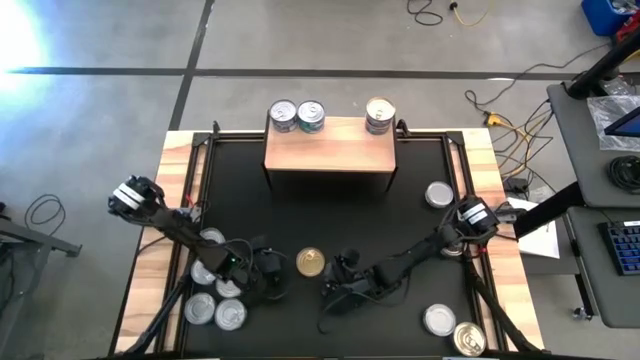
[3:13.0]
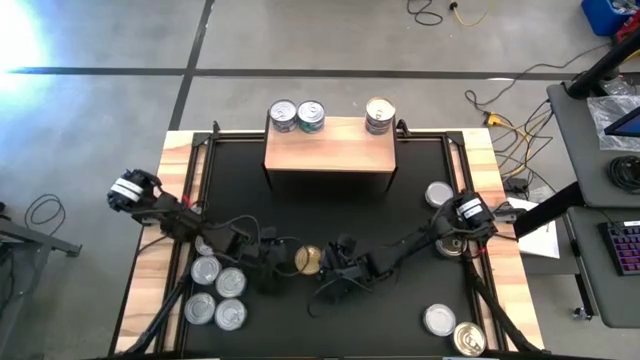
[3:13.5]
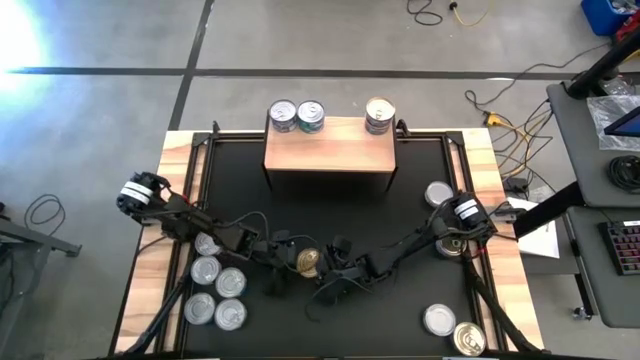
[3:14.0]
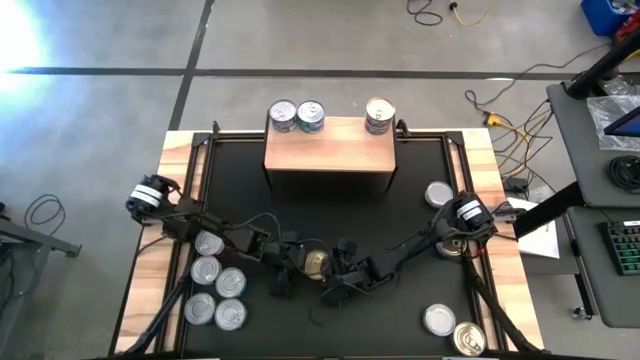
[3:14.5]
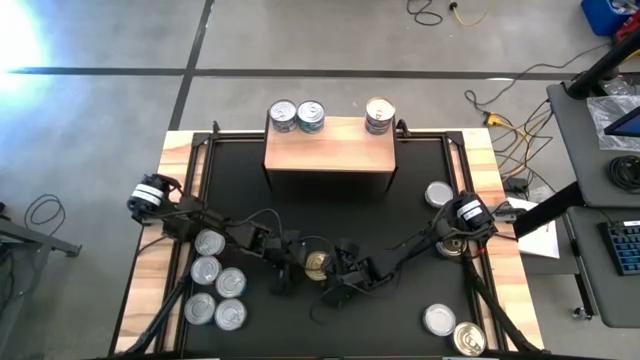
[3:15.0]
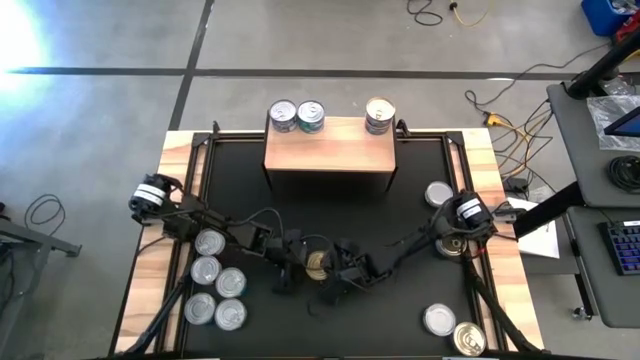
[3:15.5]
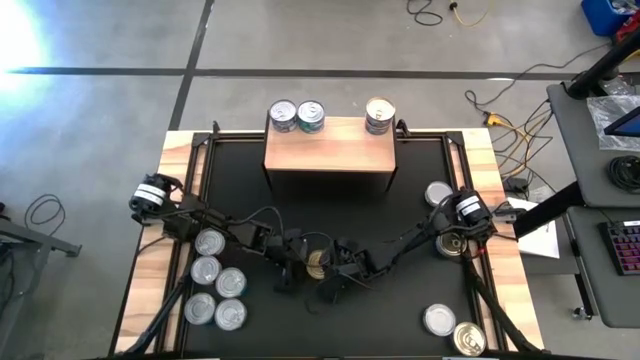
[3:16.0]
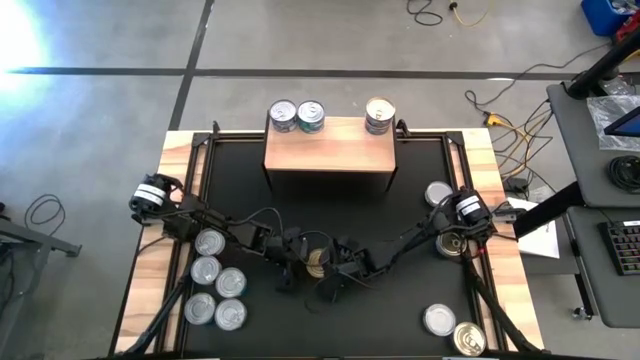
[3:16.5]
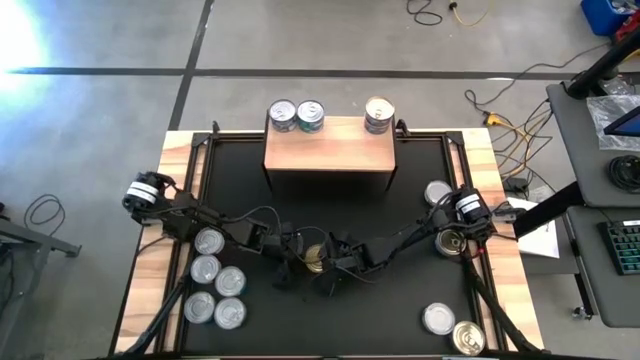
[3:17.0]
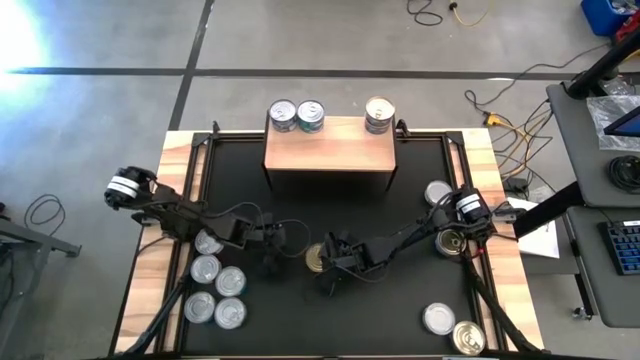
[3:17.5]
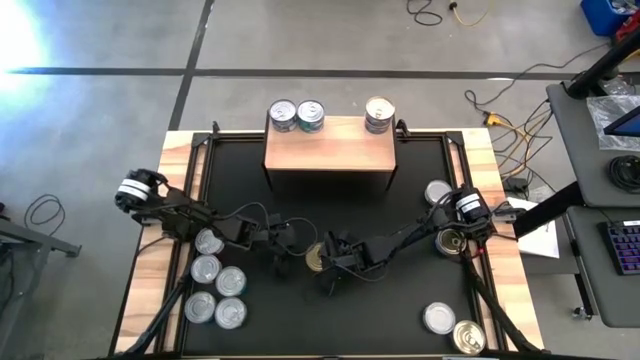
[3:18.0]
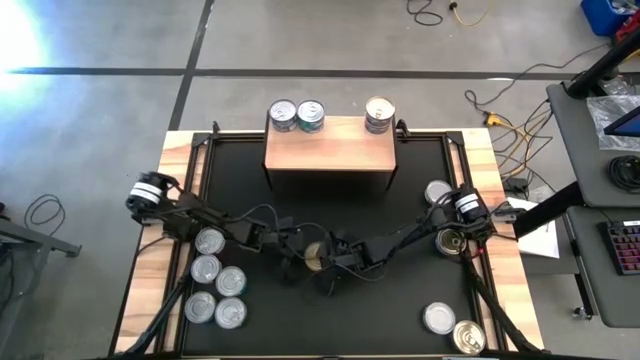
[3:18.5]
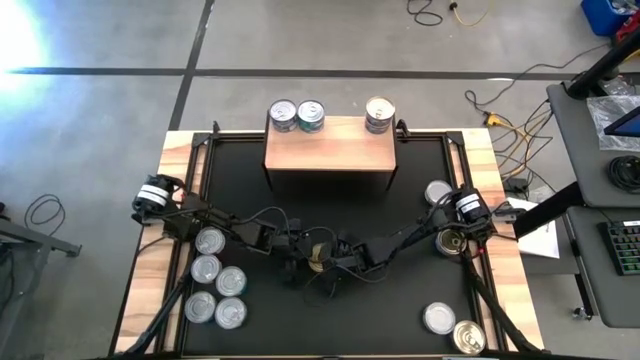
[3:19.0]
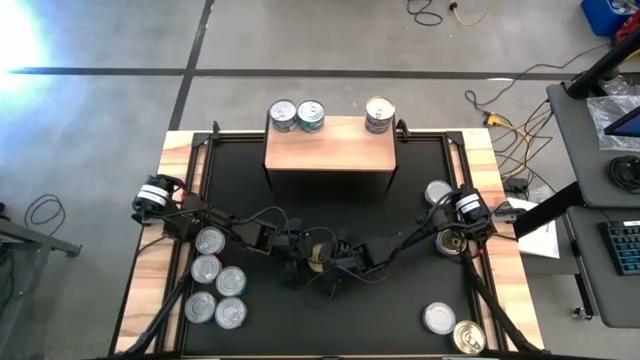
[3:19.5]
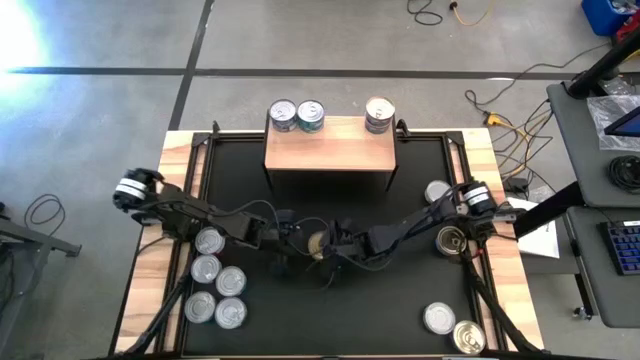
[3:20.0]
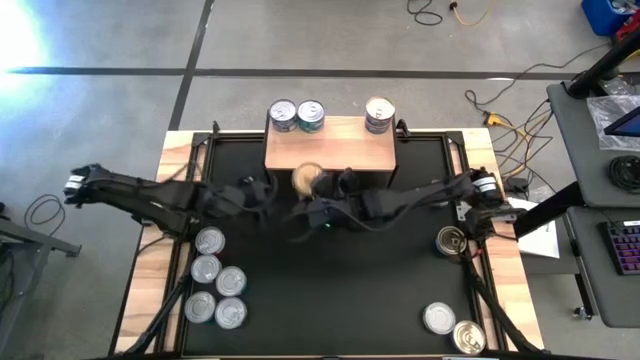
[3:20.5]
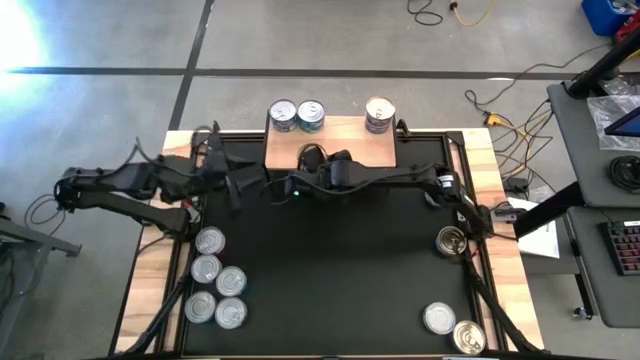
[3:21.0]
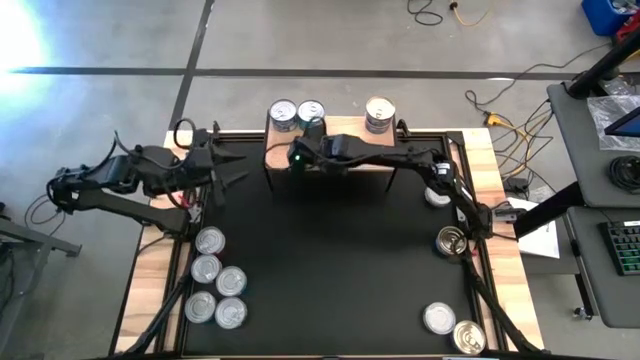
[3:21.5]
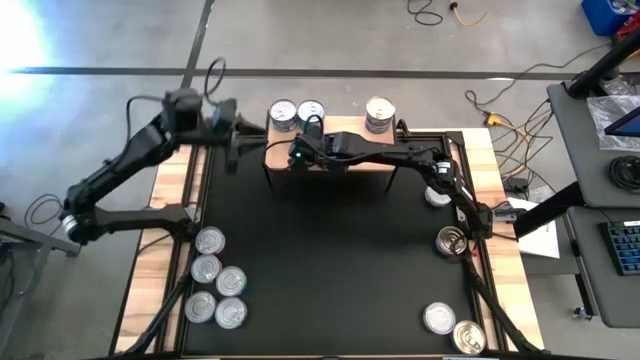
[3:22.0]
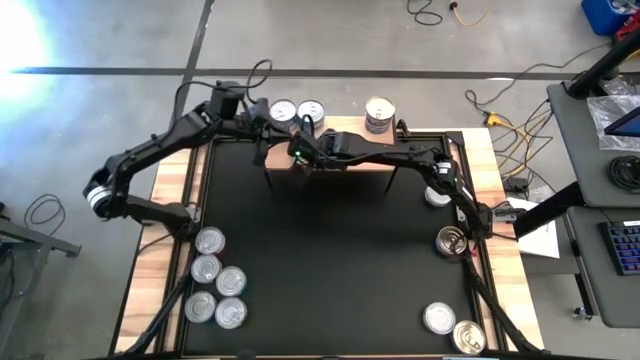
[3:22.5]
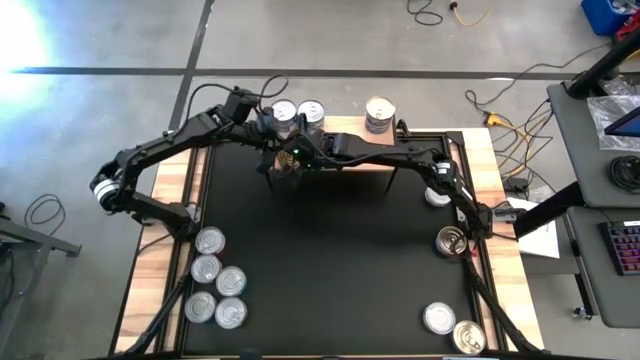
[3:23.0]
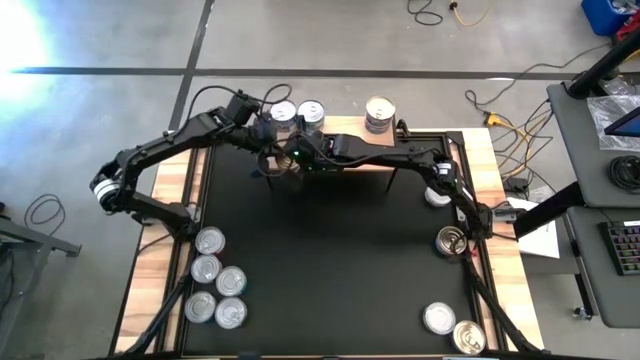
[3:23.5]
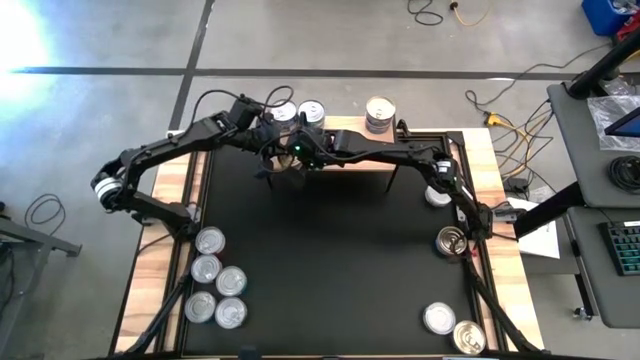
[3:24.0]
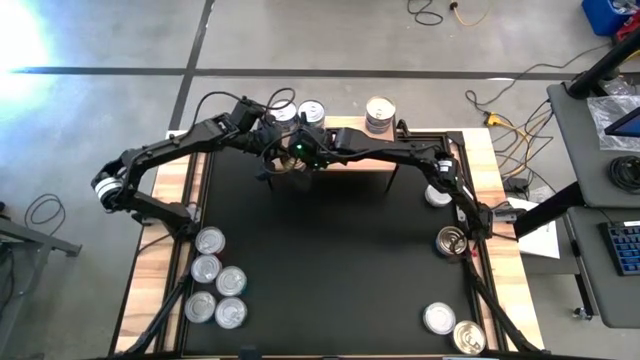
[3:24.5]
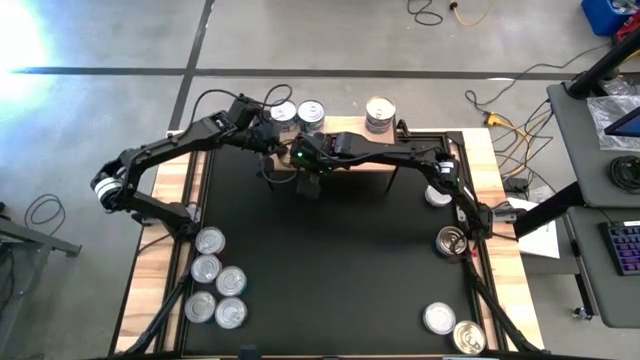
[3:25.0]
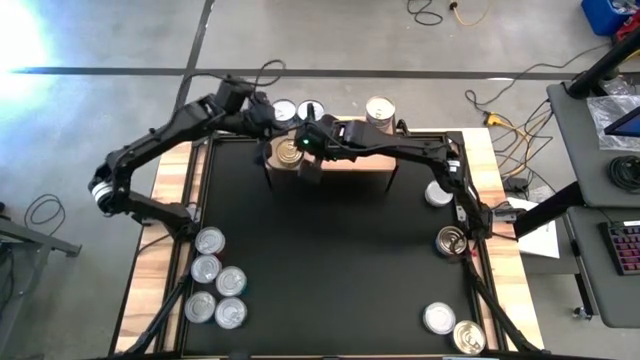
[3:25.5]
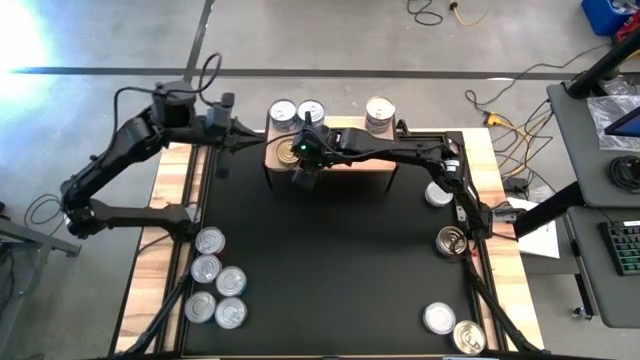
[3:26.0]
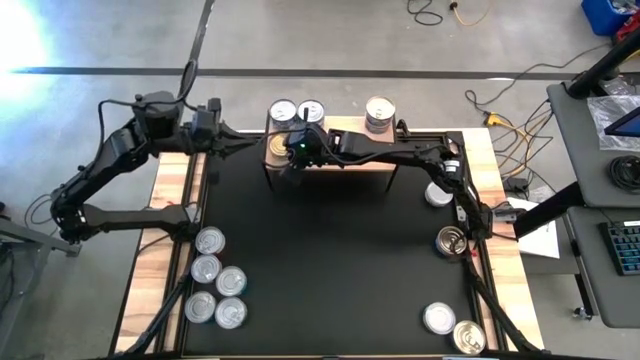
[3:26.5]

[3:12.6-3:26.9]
Task: Stack canned seafood by type on shelf
Put the top green tuna can on the shelf

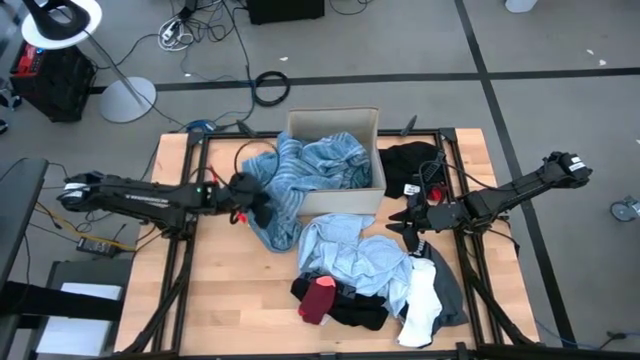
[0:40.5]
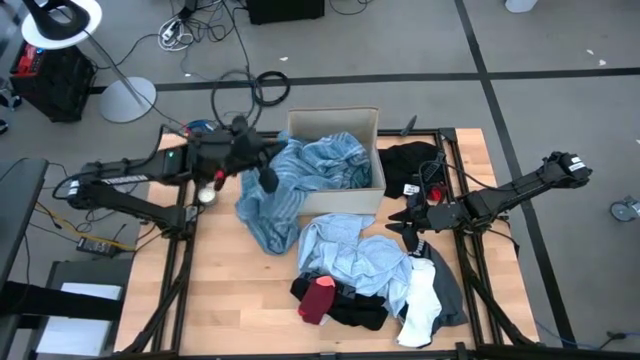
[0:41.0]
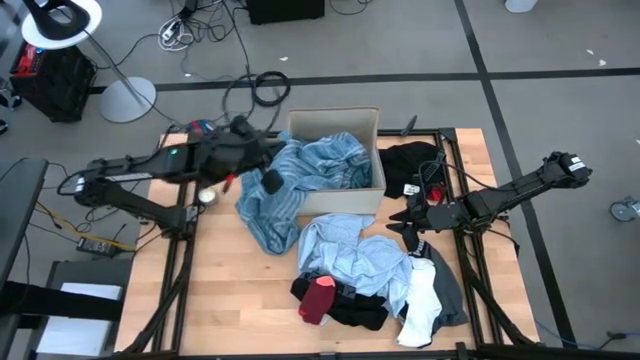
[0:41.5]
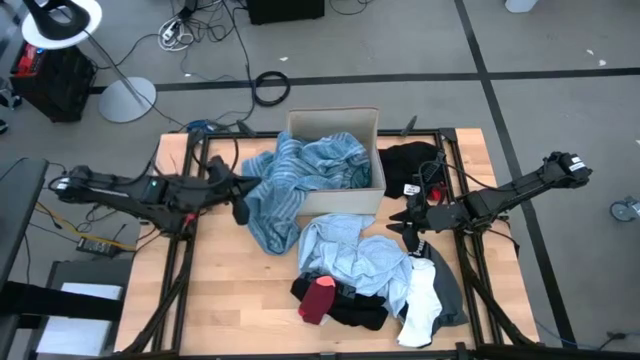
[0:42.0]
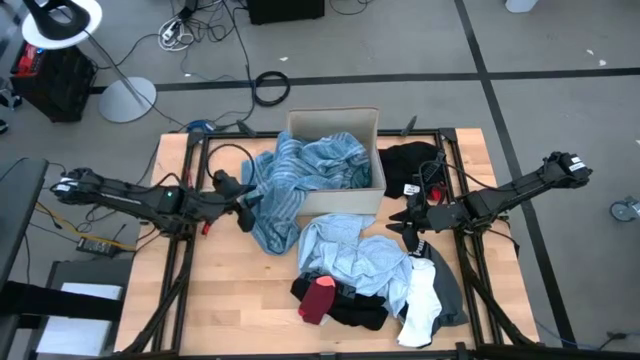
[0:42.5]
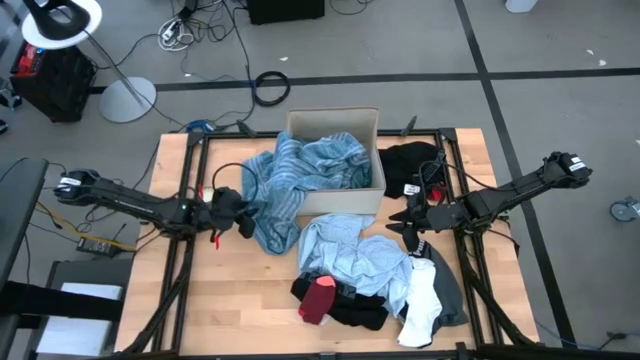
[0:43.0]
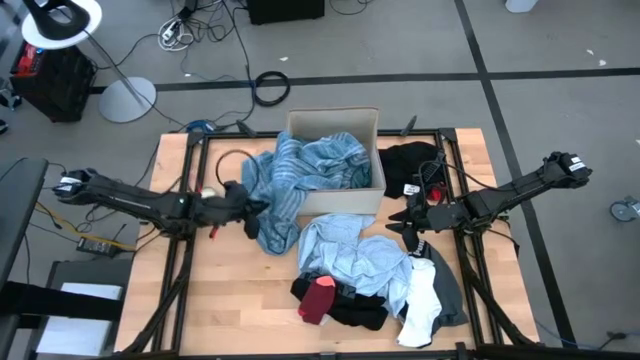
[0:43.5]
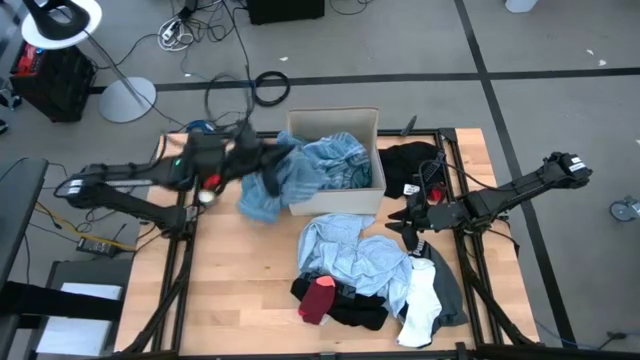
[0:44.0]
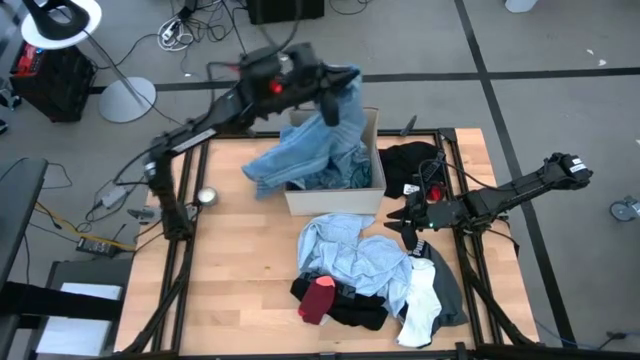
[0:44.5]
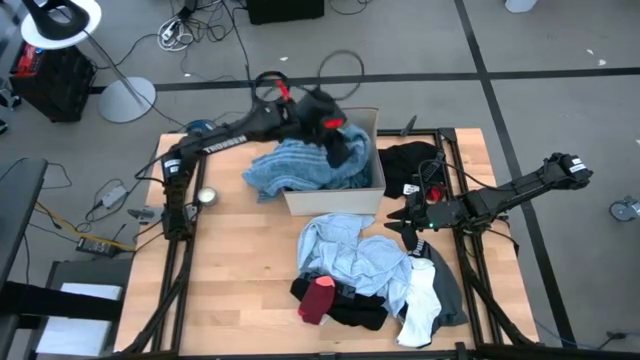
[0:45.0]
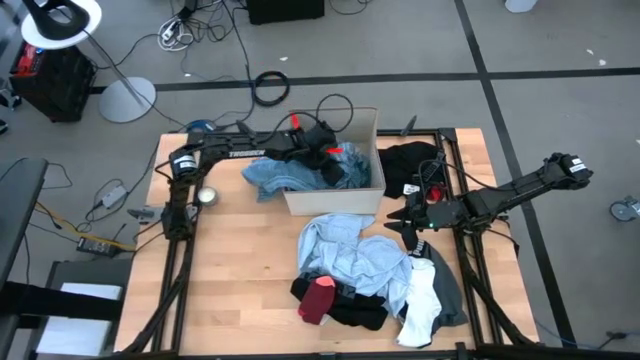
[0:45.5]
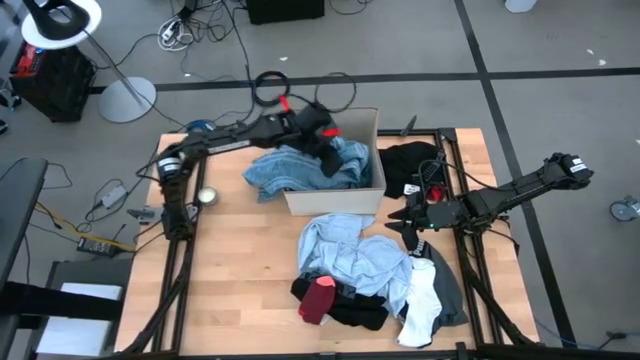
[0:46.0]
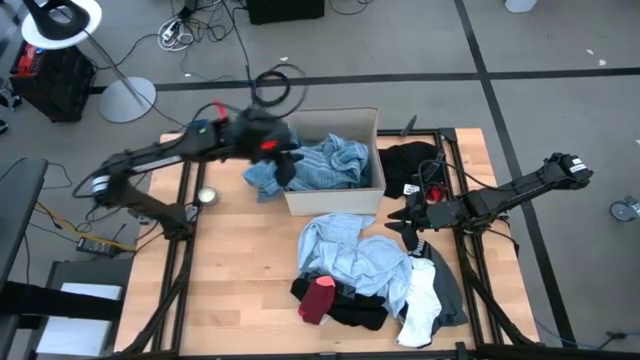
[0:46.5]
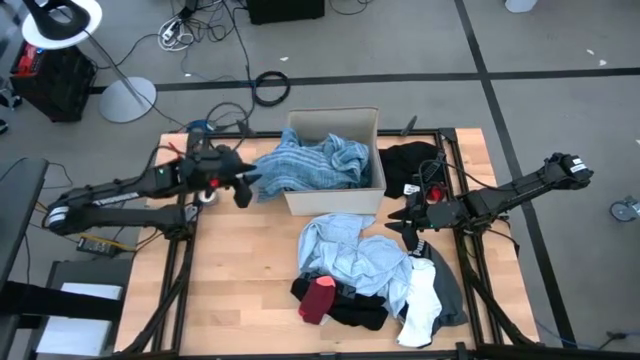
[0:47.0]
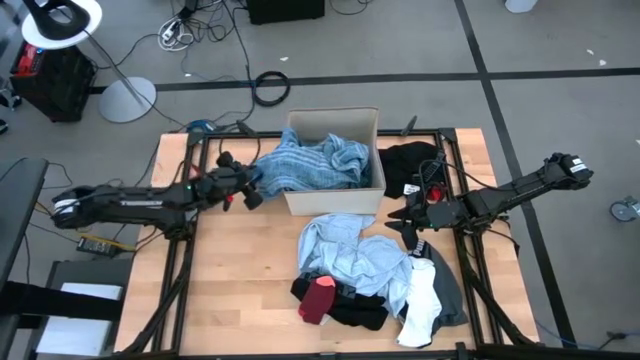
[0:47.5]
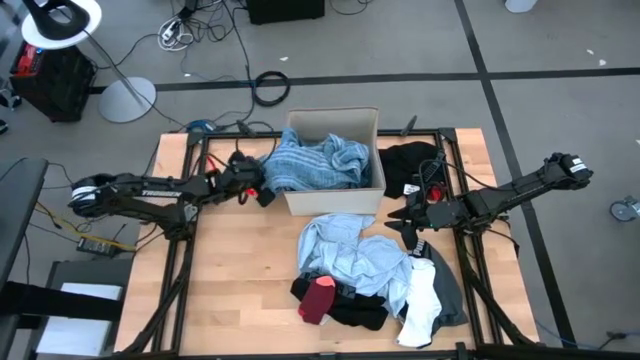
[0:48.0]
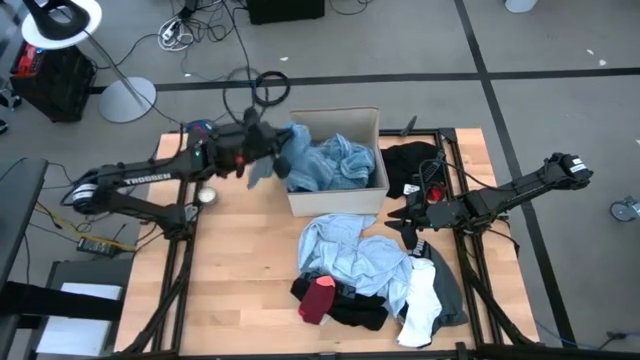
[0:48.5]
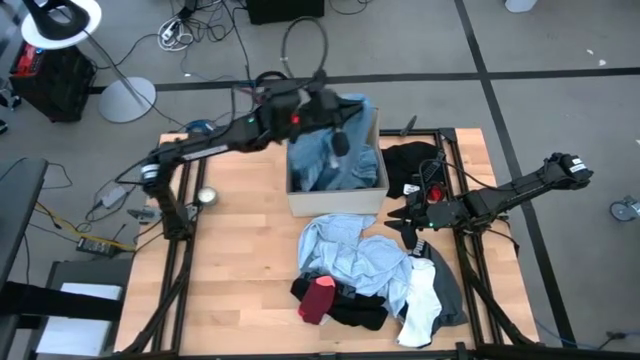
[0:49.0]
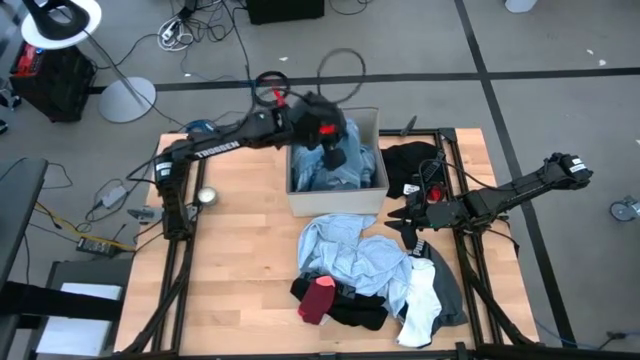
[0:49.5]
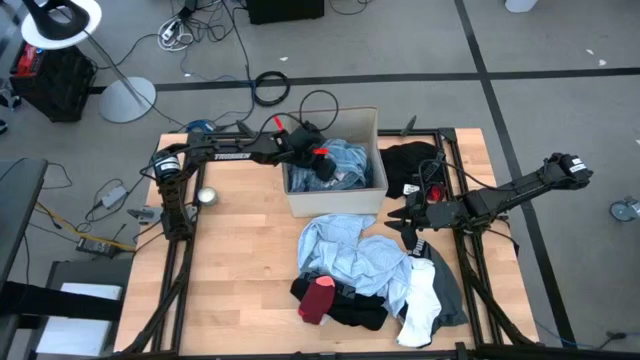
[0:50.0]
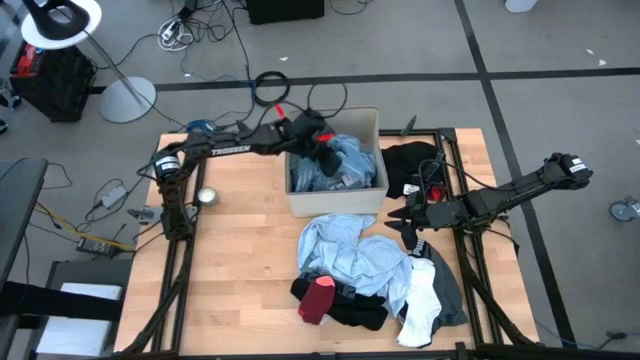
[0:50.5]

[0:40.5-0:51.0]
Task: Sort clothes
Put the blue towel into the white laundry bin
